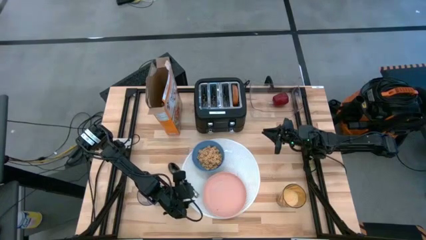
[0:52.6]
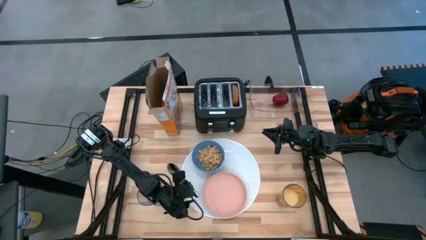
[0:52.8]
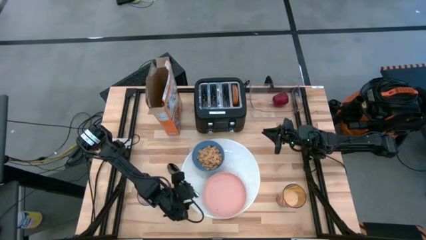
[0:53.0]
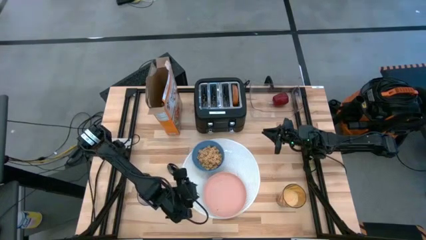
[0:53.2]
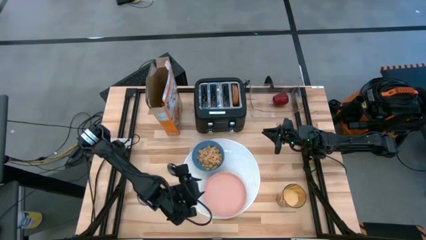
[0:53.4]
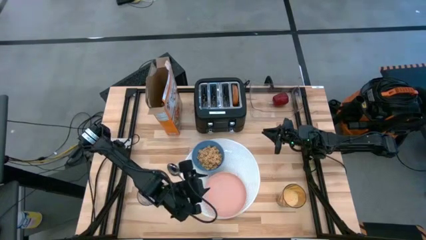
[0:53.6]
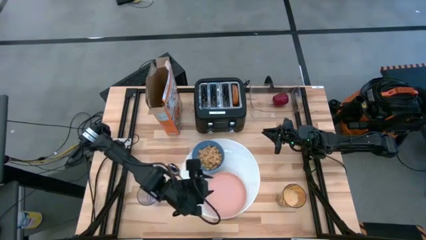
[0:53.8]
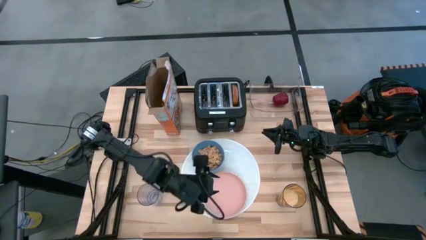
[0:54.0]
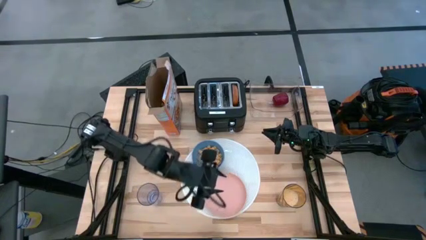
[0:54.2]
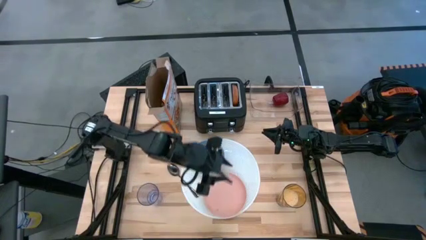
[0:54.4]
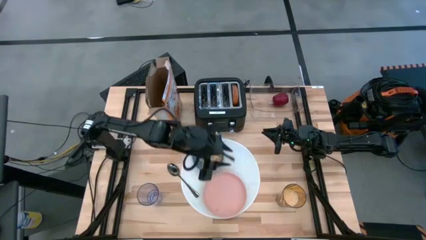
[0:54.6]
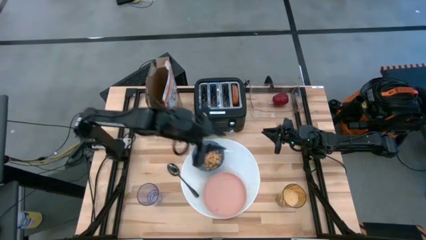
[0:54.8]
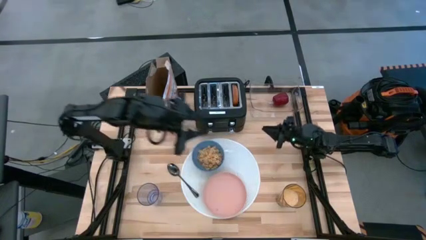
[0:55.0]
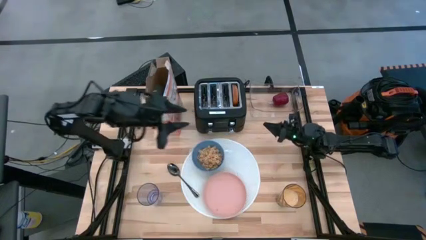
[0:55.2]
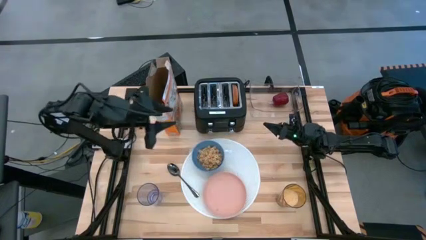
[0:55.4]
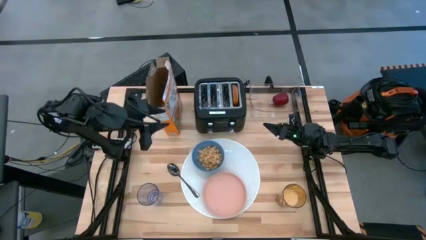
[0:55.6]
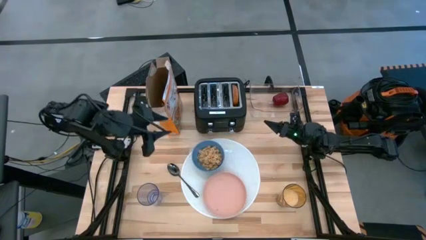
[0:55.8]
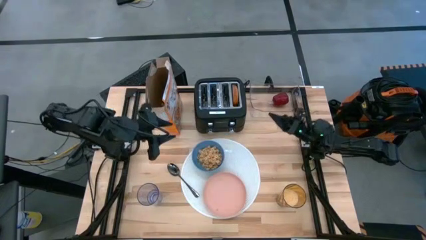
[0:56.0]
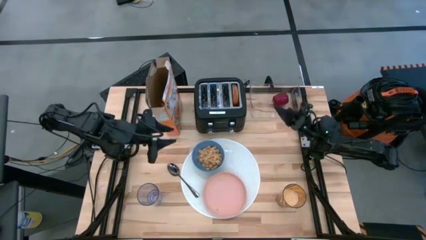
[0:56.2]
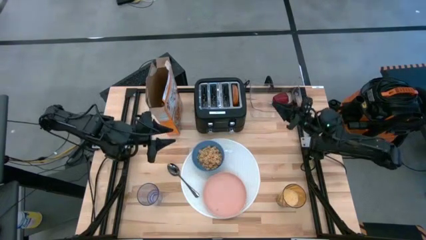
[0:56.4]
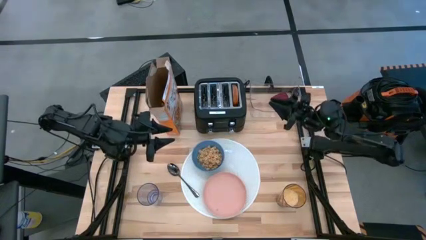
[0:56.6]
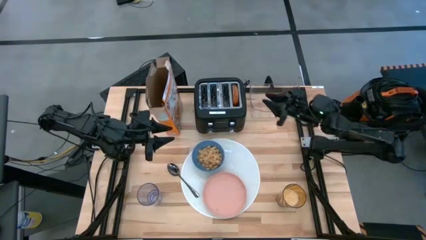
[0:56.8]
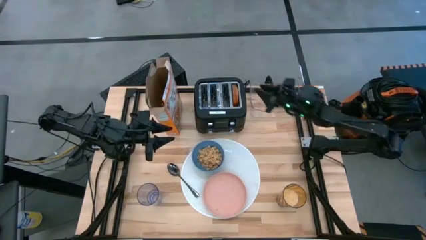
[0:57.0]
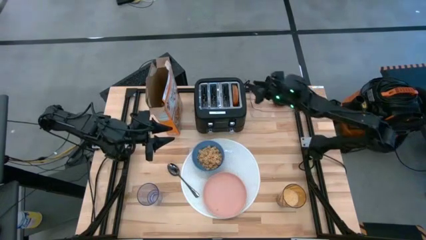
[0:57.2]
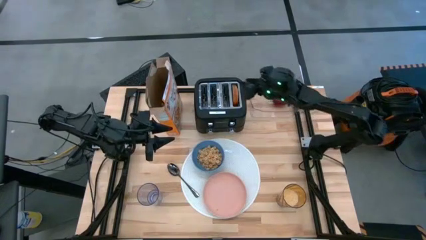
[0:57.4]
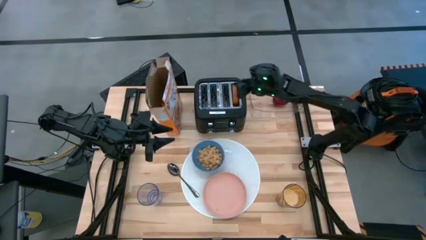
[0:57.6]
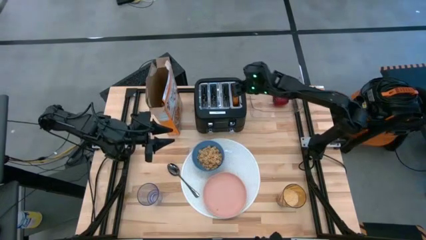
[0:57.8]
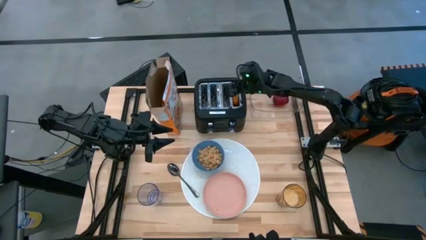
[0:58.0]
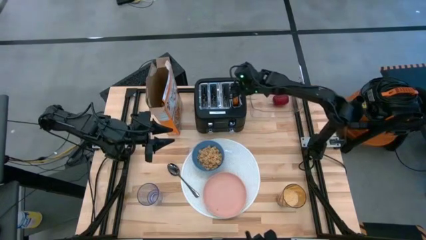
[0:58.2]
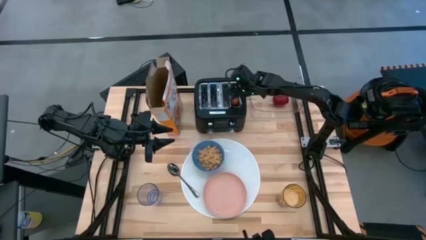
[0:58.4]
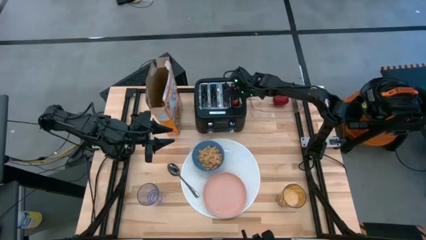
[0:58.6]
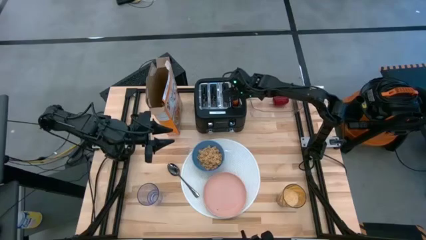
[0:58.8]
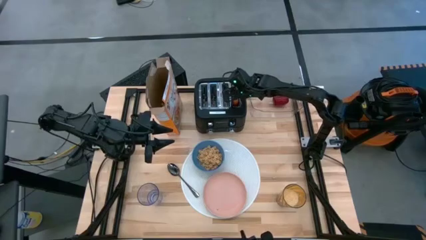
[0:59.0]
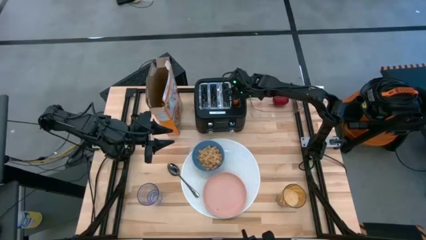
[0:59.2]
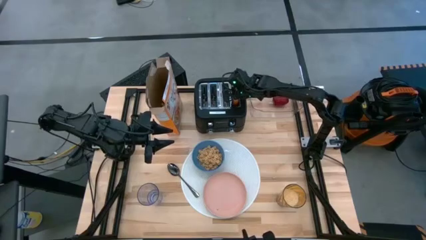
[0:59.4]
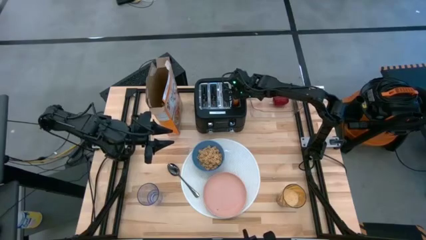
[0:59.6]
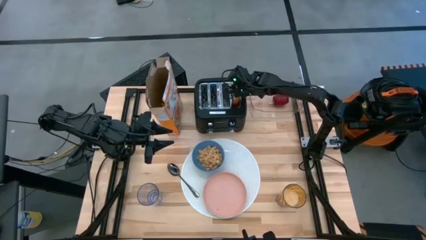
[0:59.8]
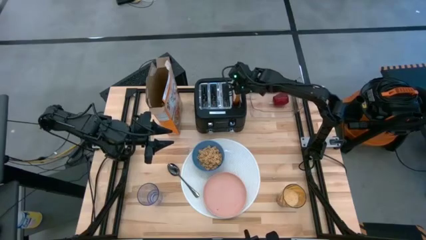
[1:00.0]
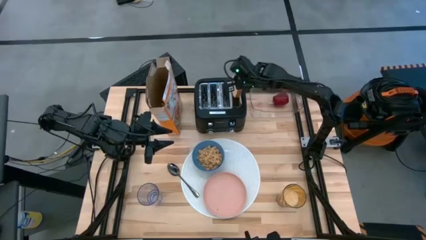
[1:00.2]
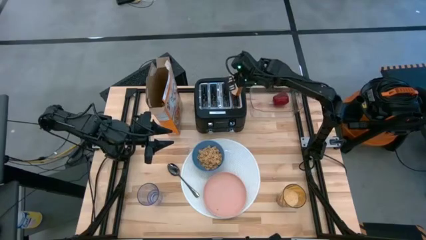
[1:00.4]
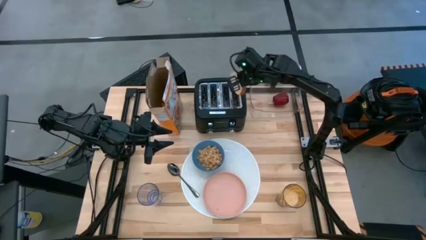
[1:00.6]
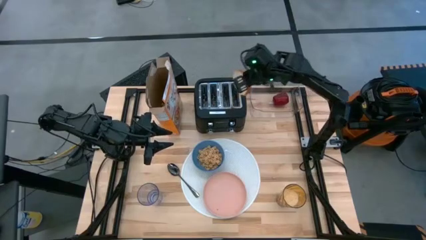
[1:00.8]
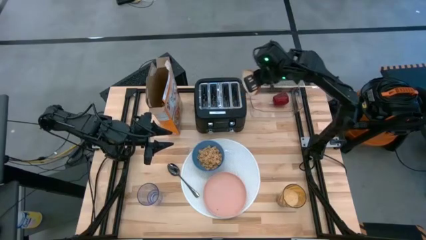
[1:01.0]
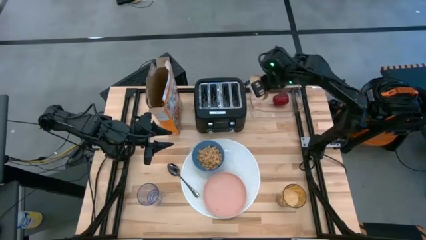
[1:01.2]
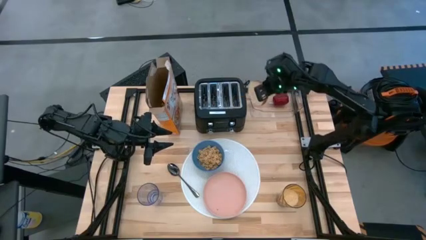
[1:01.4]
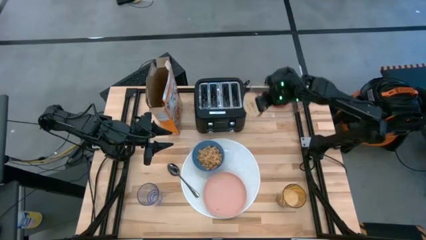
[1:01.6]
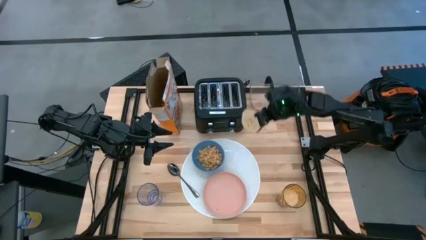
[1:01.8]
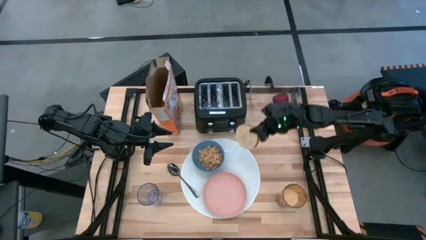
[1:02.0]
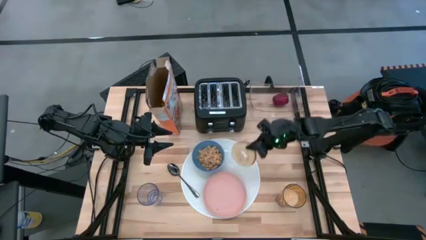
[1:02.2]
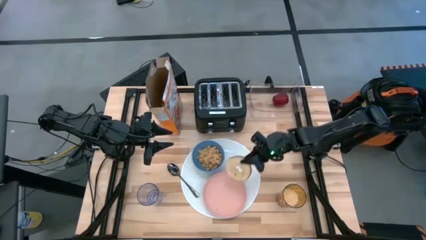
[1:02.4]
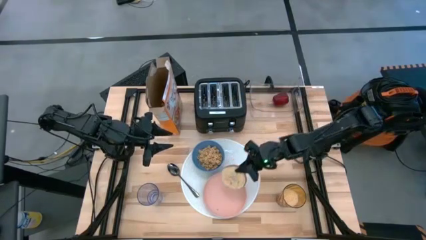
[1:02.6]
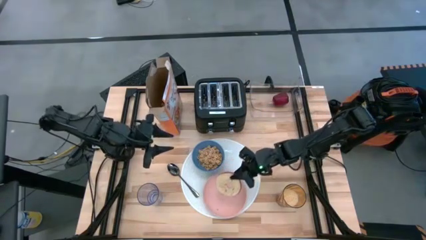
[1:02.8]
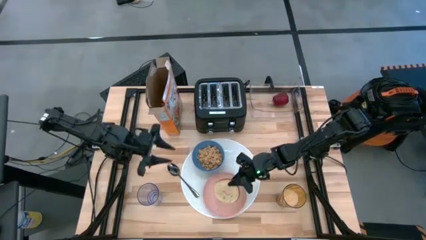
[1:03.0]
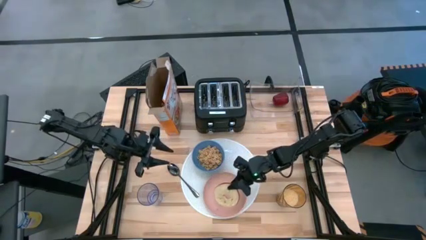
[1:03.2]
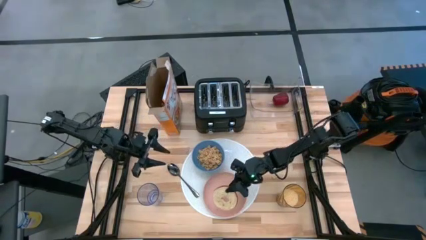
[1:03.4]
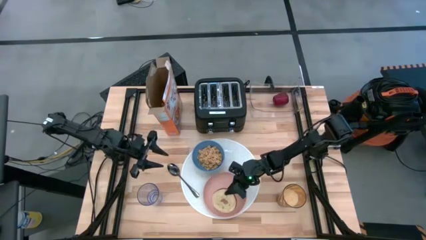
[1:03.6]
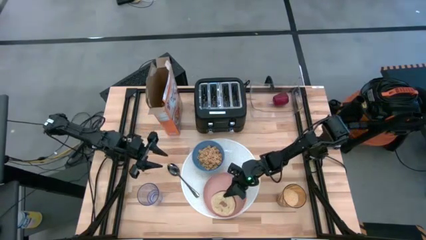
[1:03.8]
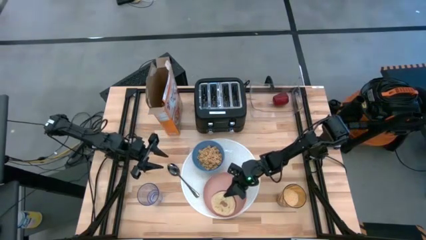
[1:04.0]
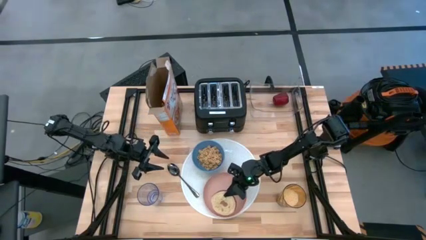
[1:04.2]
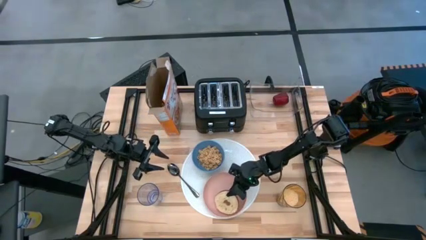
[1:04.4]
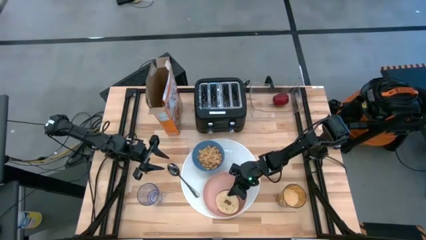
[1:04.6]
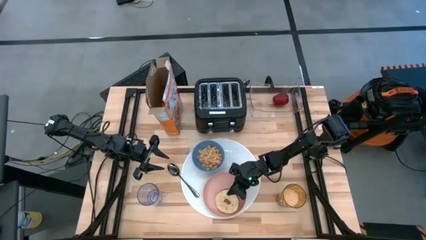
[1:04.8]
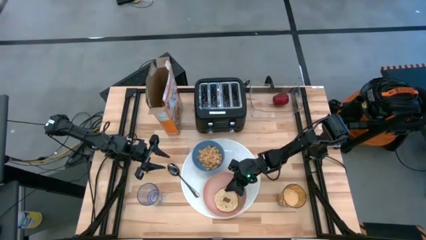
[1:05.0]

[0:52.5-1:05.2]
Task: Arrange a breakfast setting
Put the toasted bread on the plate

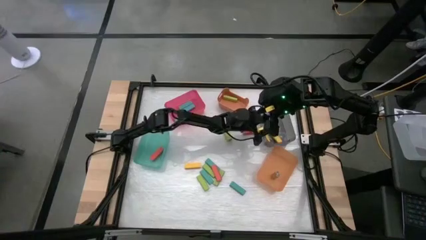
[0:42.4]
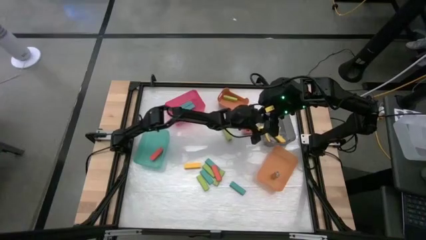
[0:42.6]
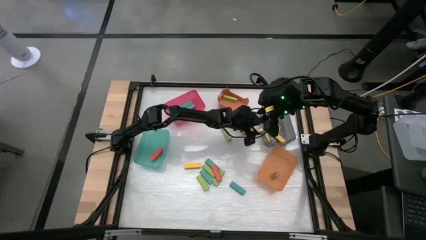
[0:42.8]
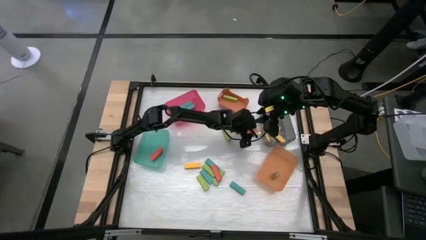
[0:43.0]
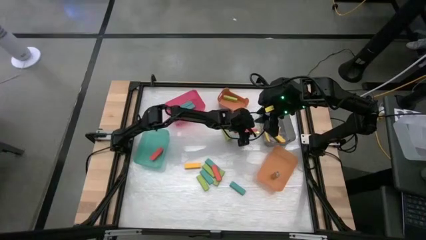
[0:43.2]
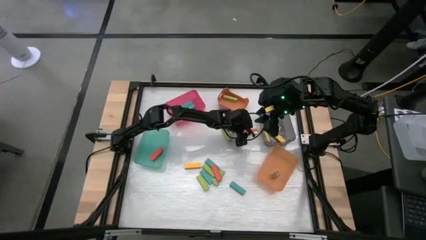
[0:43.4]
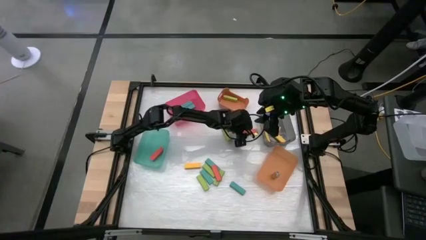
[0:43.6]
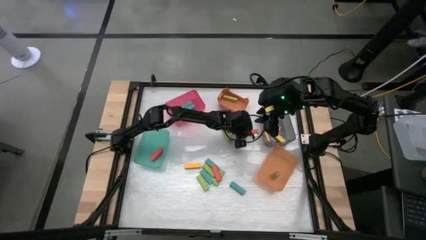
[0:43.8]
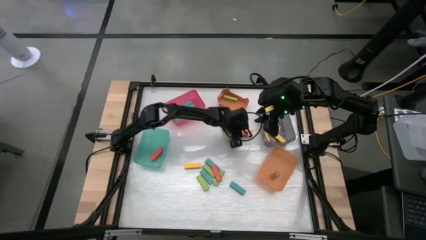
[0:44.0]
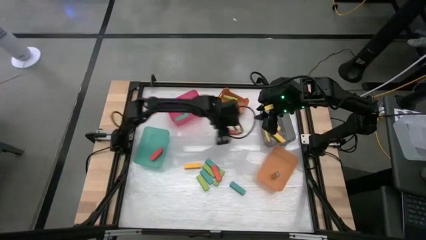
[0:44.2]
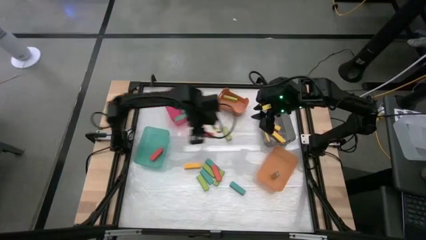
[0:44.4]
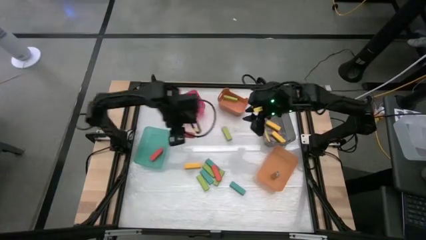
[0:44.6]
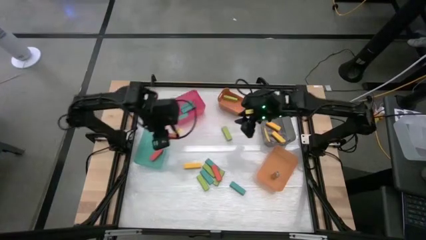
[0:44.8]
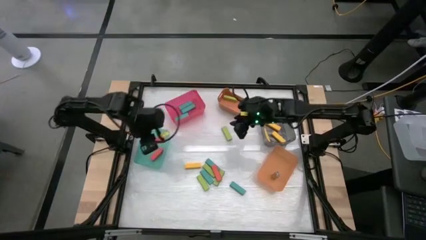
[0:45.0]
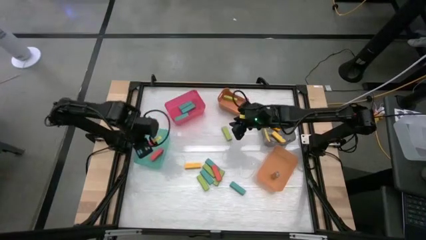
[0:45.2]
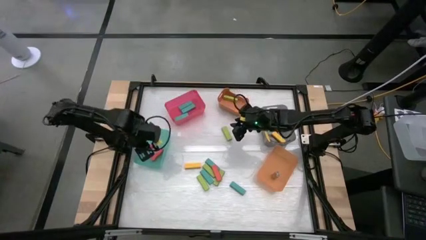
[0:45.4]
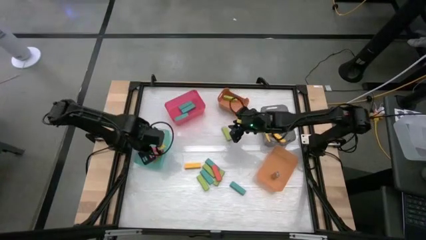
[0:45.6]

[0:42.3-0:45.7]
Task: Sort blocks
Put the orange block into the blue bin

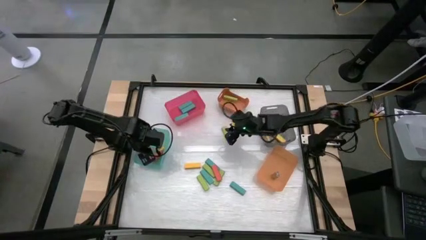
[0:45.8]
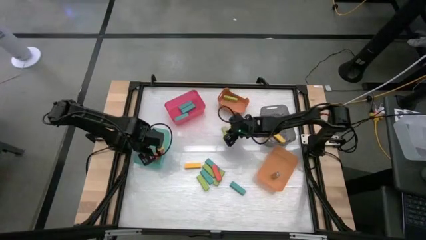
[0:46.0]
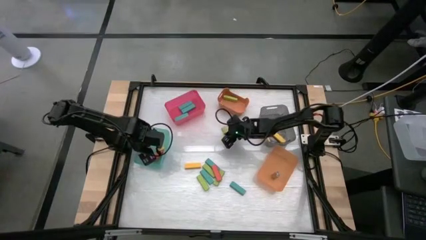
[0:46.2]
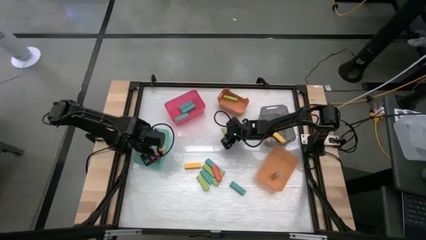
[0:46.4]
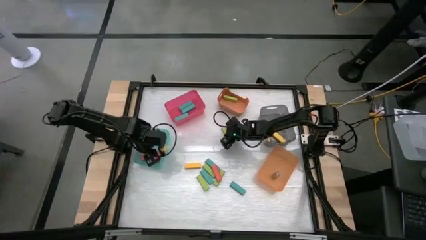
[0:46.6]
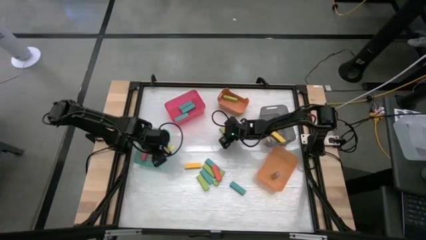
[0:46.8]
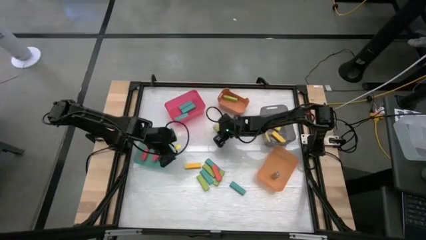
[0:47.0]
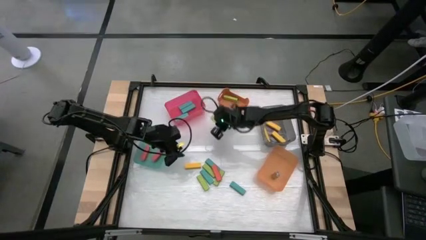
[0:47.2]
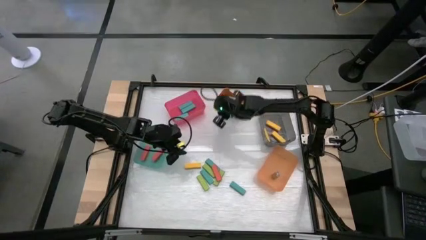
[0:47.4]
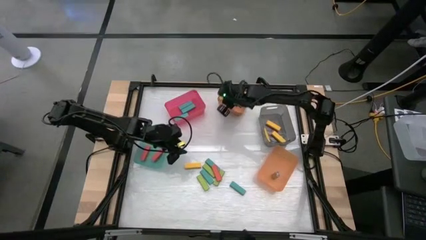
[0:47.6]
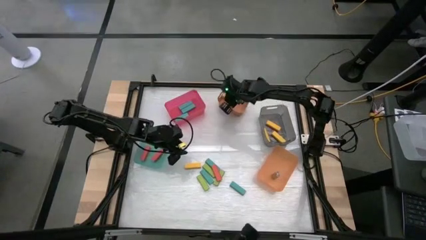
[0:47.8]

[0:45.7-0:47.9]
Put the green block into the orange bin
